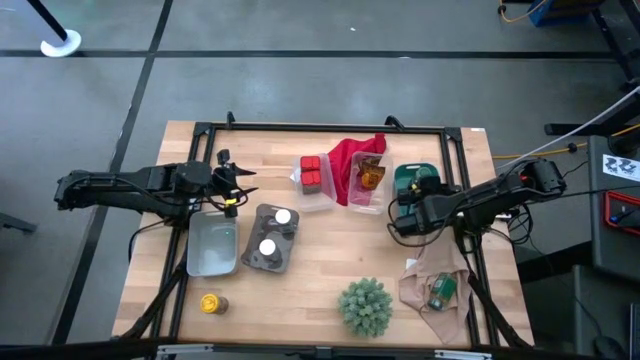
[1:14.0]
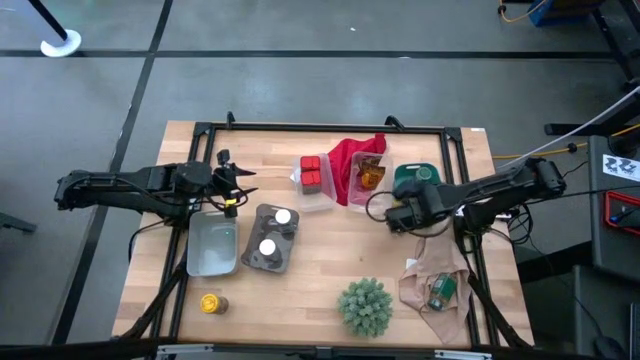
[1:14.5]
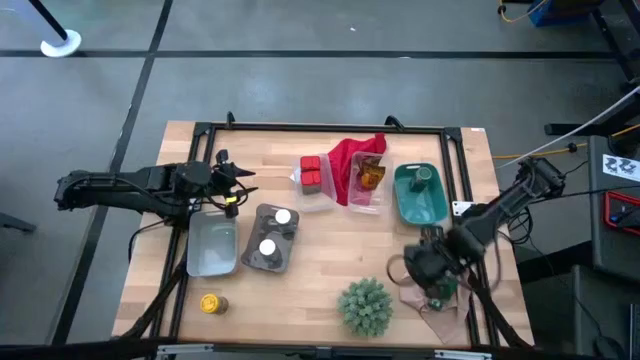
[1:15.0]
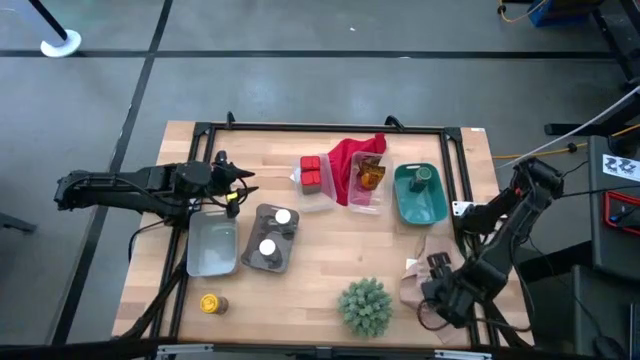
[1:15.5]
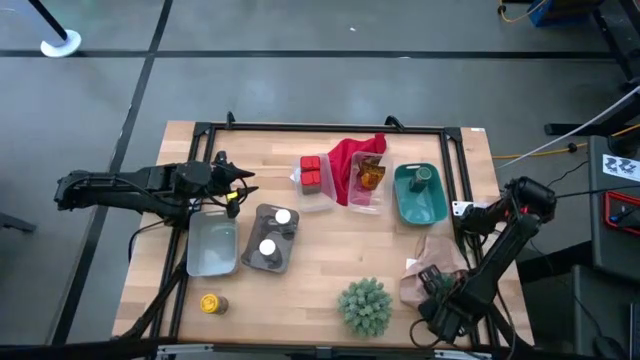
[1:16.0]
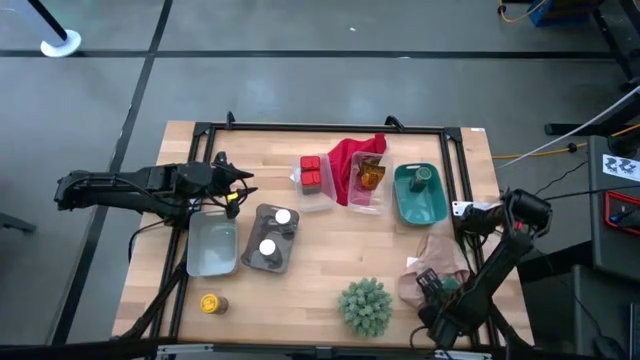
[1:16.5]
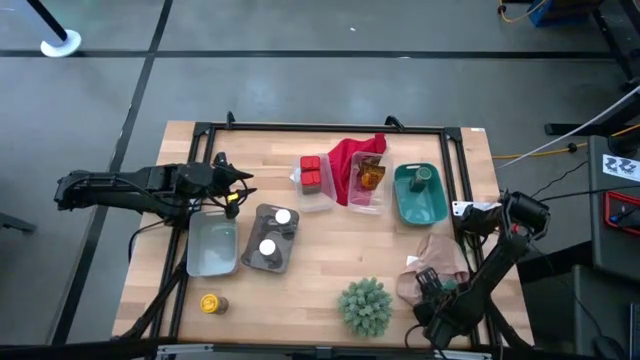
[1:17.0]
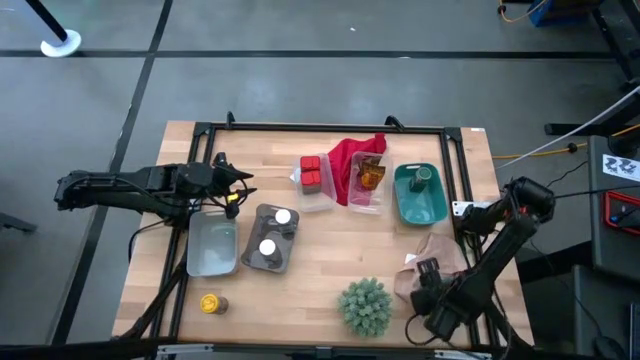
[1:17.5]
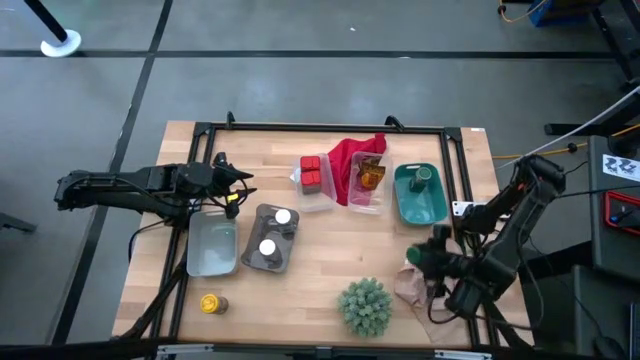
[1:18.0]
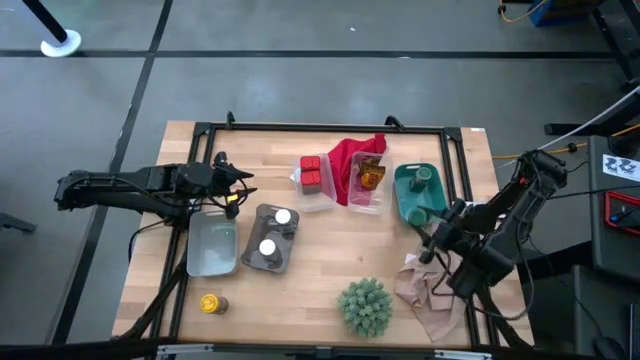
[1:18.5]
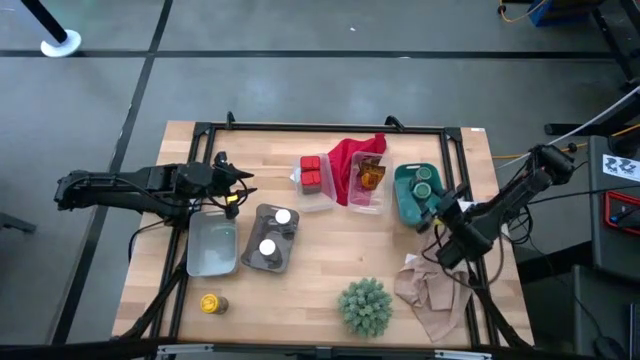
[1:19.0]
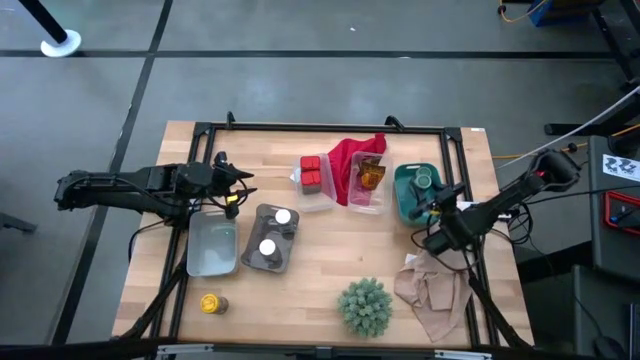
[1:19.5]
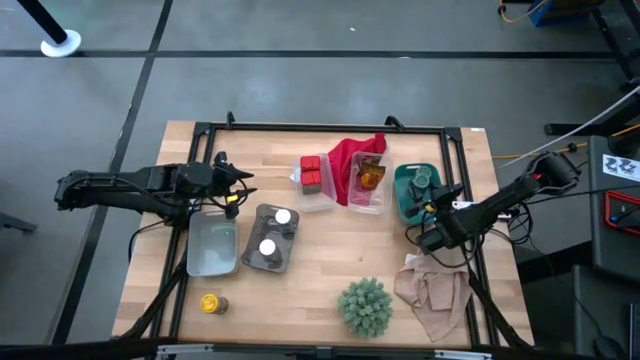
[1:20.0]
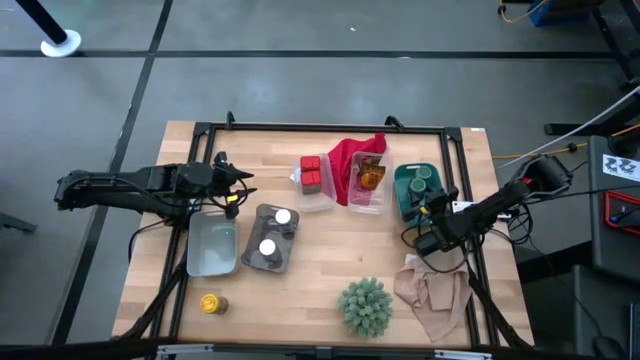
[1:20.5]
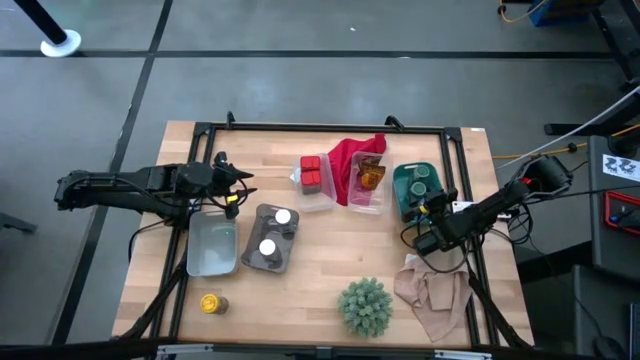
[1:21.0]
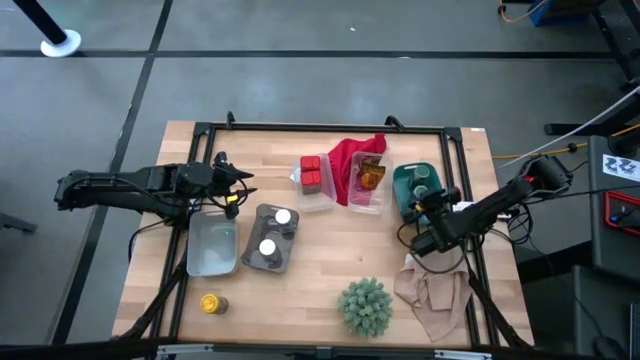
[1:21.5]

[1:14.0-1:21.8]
Task: Sort spices by type
Put the green seasoning bottle into the green bin

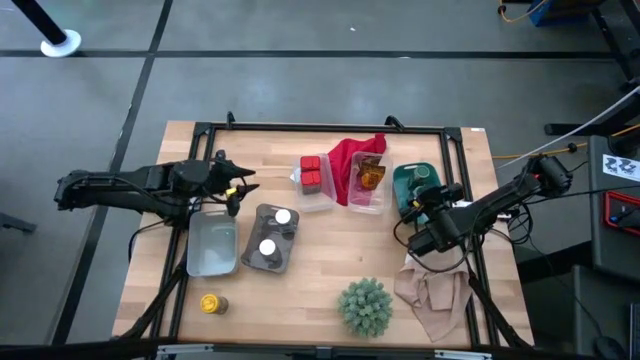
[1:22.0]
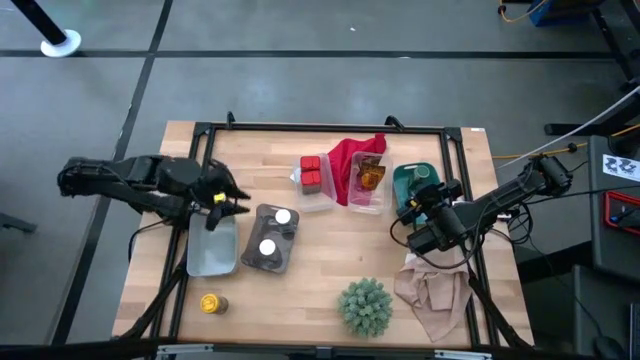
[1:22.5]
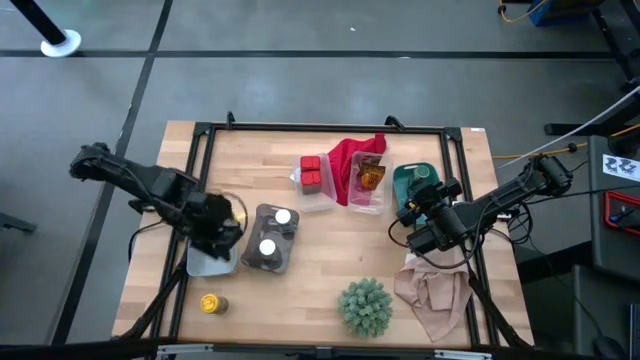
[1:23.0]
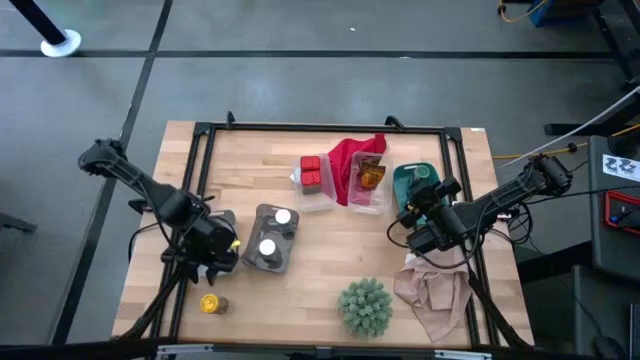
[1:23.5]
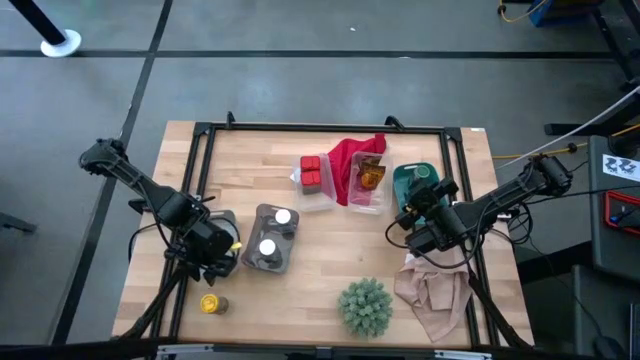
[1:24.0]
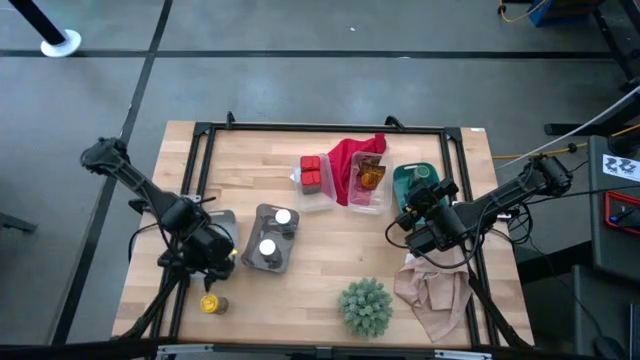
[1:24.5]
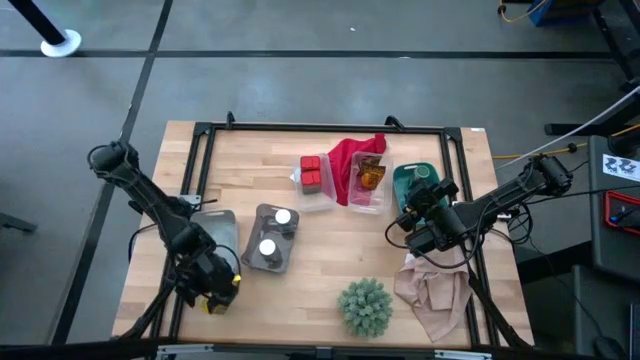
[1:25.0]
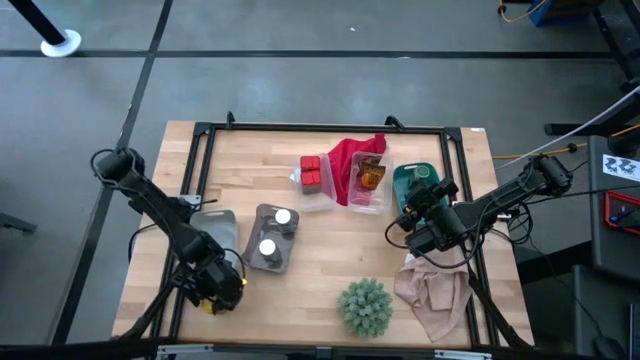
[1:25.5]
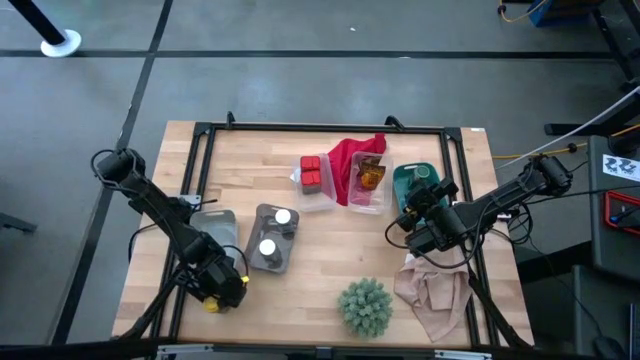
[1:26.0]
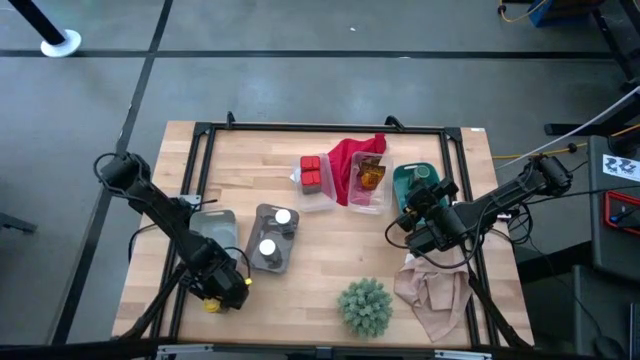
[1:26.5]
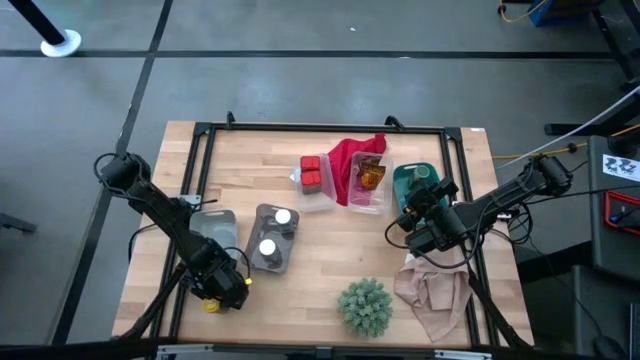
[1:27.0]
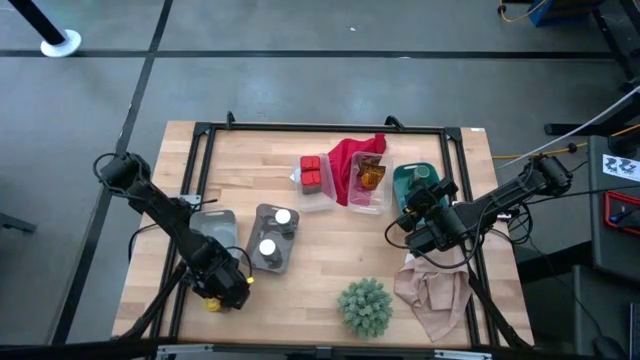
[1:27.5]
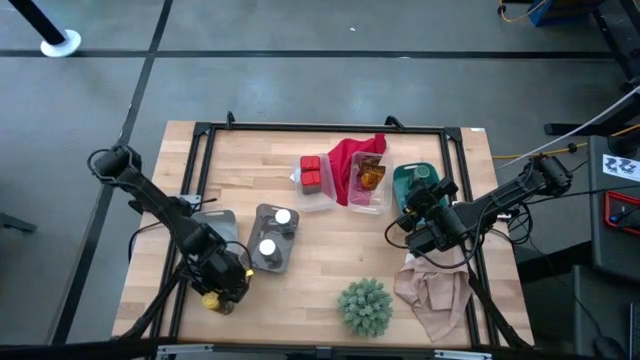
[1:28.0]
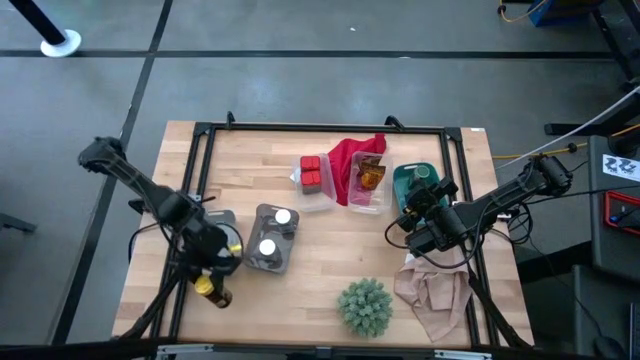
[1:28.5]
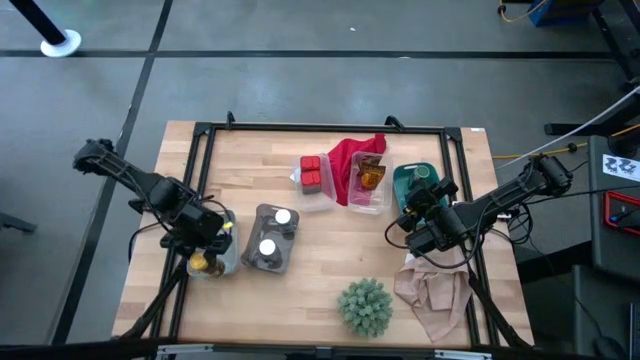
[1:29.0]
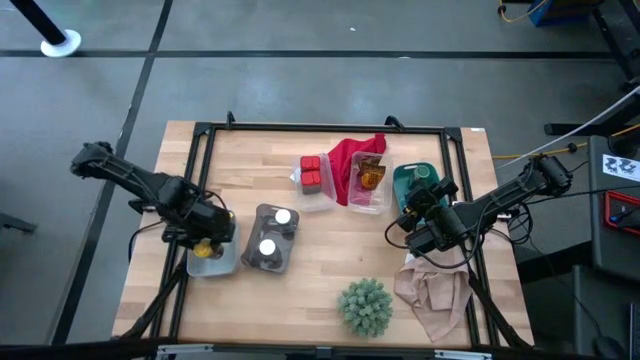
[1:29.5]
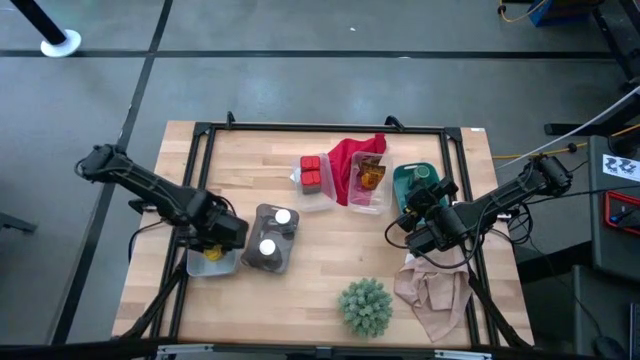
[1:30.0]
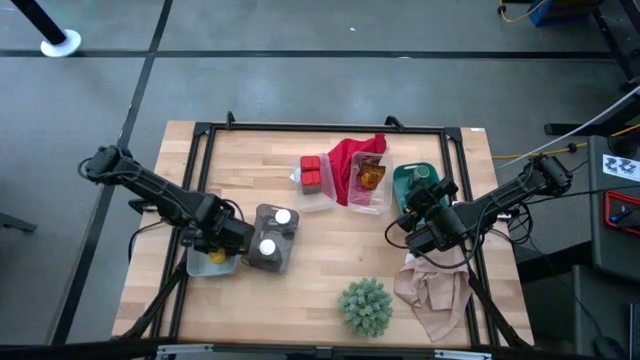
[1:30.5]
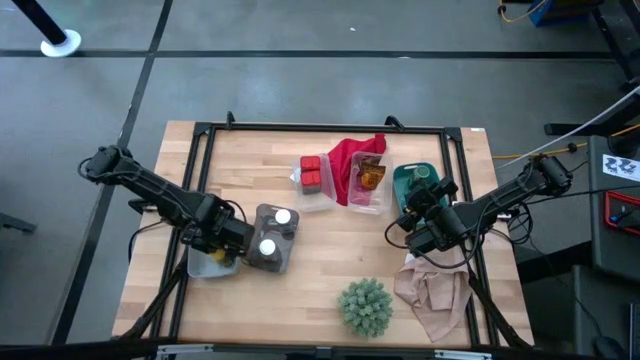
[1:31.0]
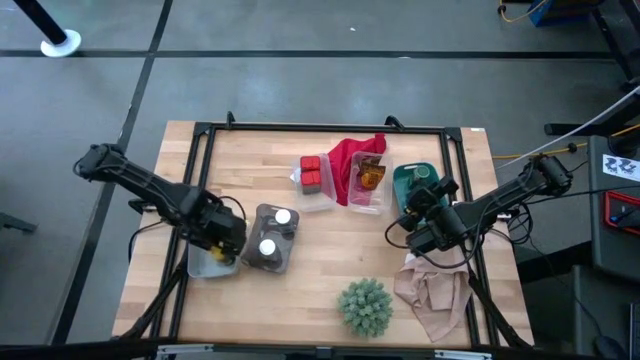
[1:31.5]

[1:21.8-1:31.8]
Put the yellow seasoning bottle into the gray bin

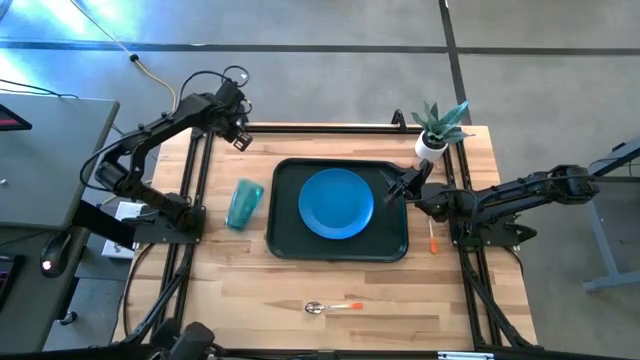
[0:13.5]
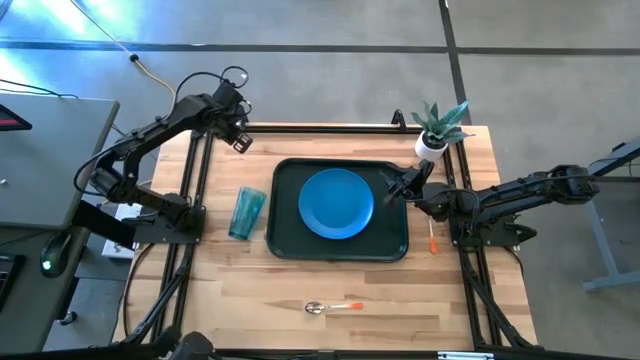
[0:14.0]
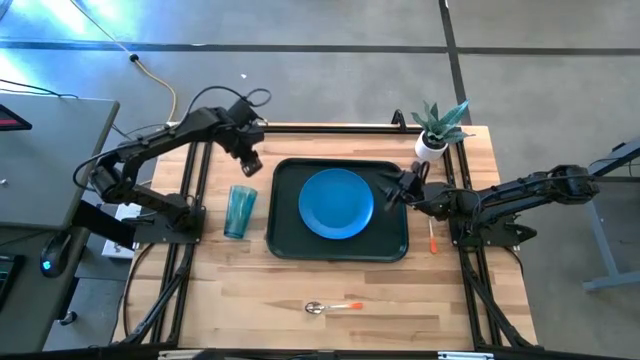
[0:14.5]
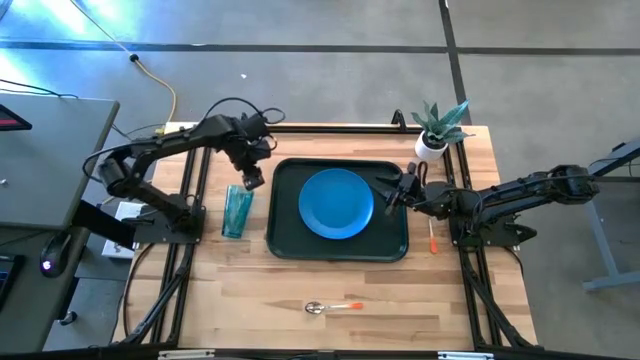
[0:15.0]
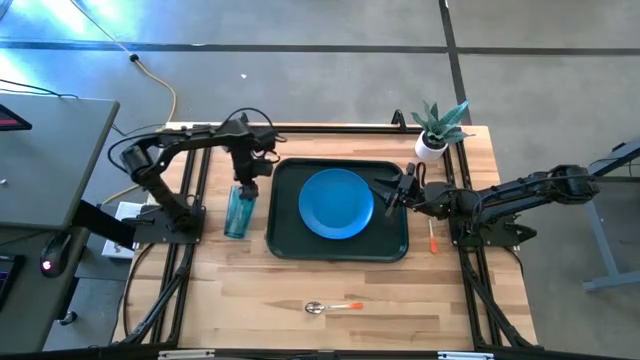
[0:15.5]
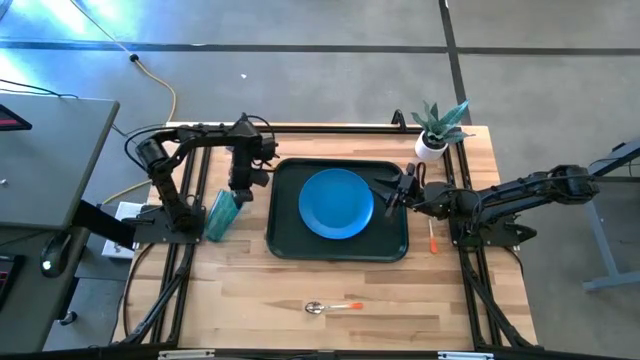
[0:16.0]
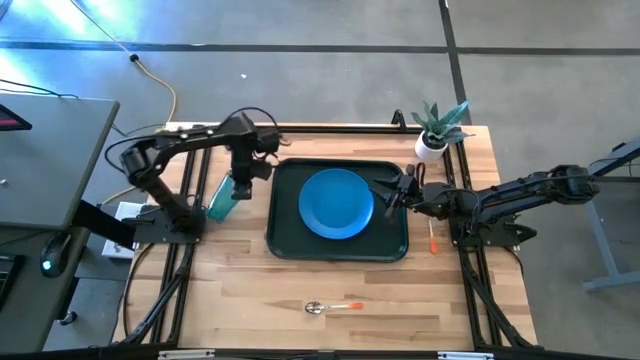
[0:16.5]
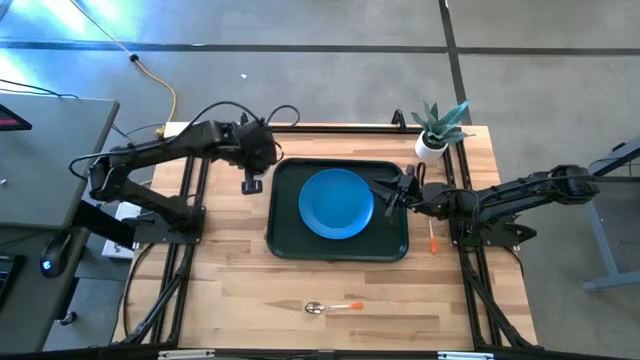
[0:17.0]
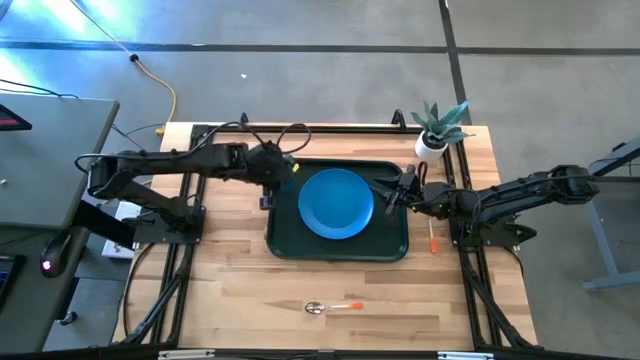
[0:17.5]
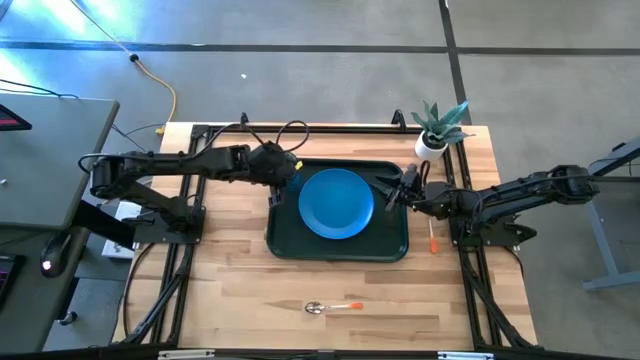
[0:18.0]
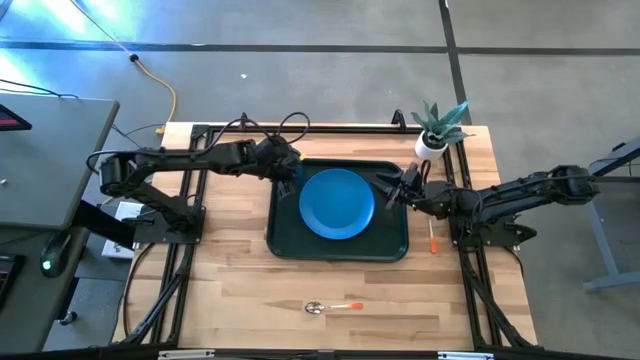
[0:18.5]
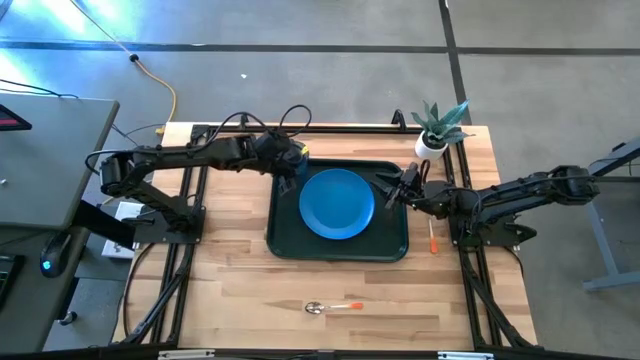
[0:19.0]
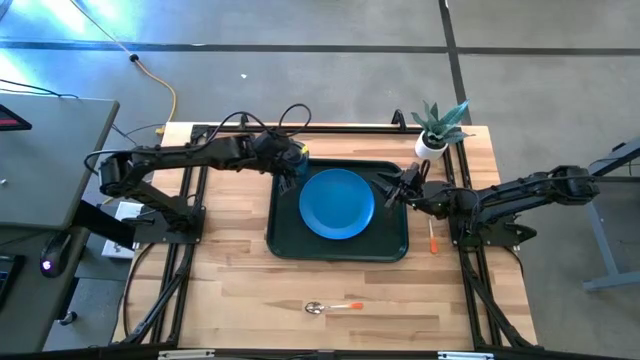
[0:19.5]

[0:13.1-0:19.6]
Task: Pick and place plate/cup/fork/spoon on tray
Put the blue cup on the dark green tray to the top left of the blue plate
